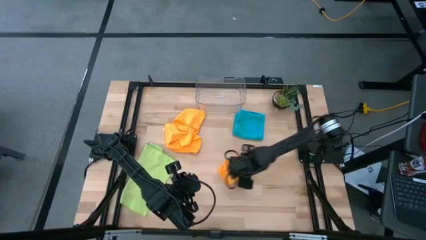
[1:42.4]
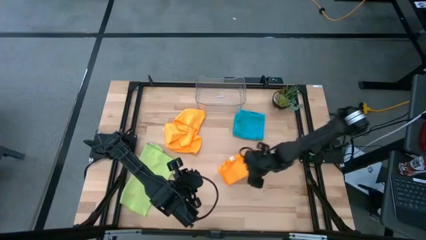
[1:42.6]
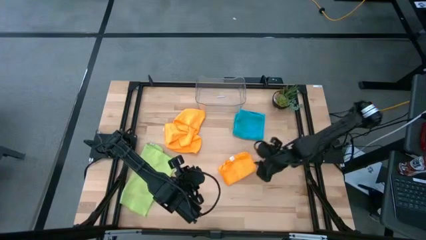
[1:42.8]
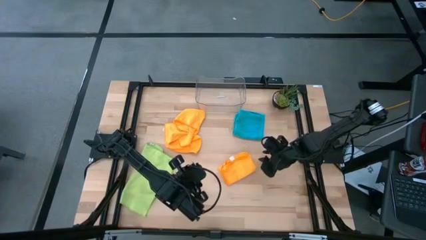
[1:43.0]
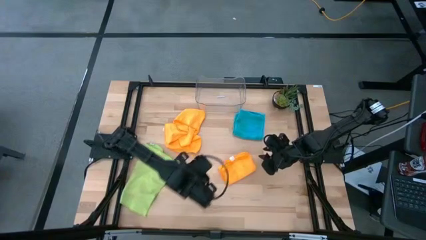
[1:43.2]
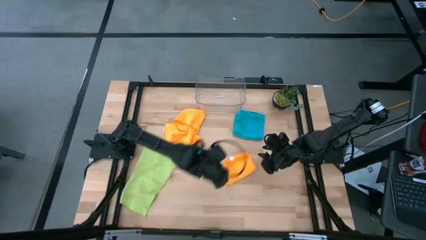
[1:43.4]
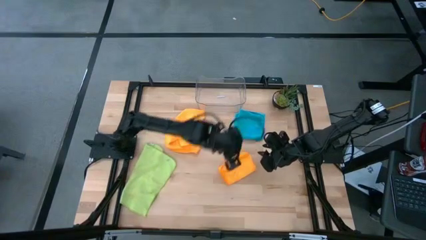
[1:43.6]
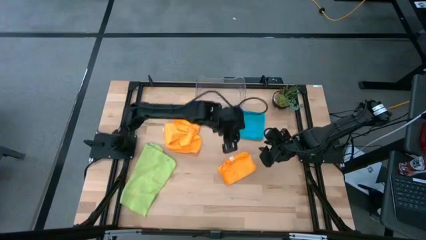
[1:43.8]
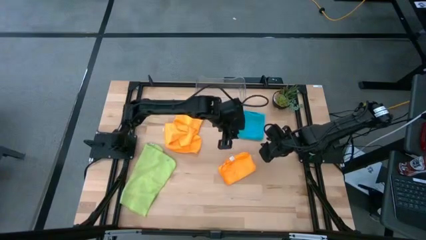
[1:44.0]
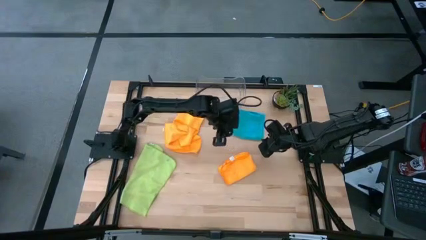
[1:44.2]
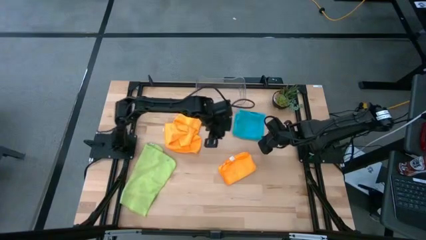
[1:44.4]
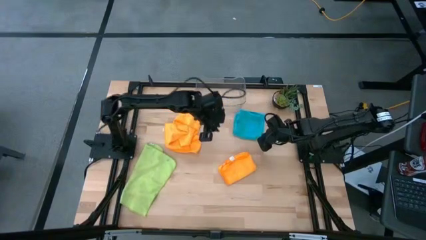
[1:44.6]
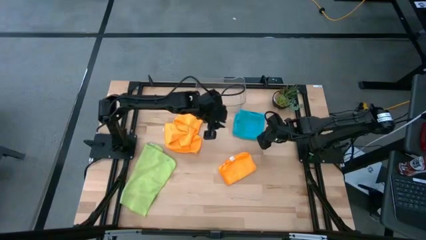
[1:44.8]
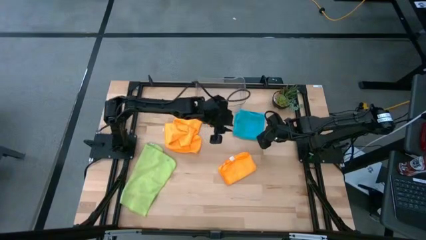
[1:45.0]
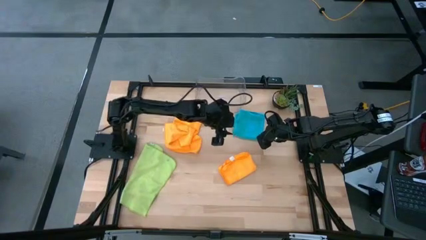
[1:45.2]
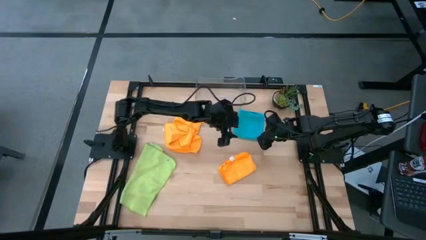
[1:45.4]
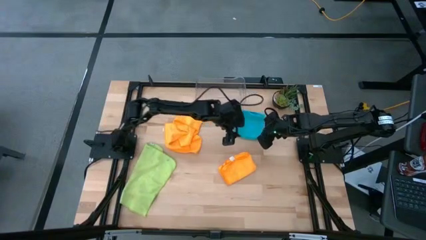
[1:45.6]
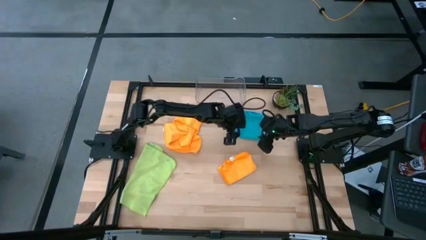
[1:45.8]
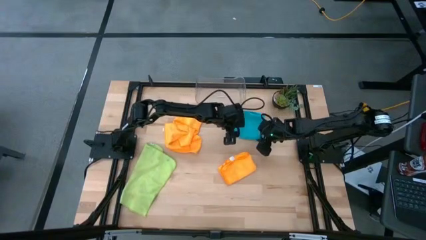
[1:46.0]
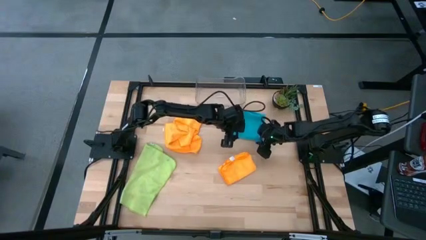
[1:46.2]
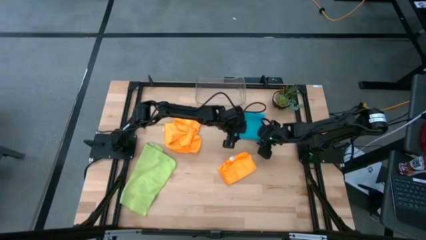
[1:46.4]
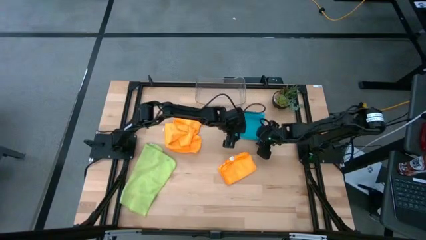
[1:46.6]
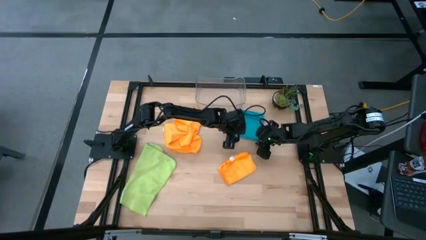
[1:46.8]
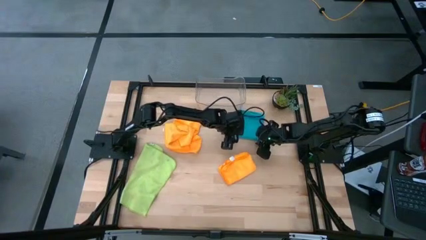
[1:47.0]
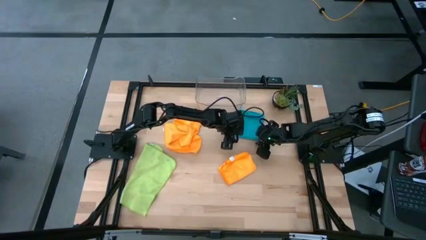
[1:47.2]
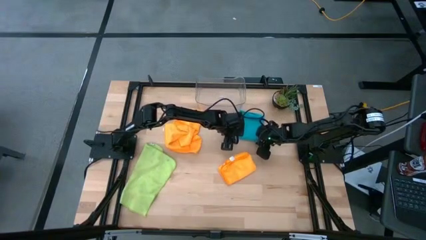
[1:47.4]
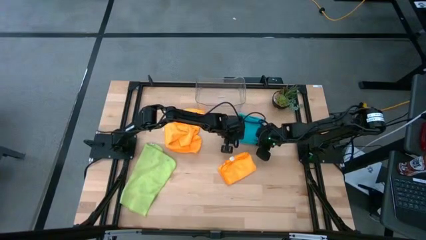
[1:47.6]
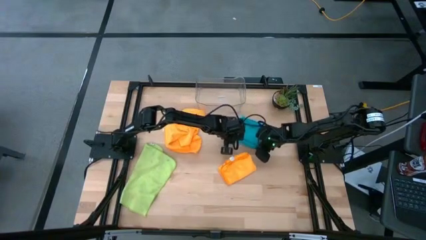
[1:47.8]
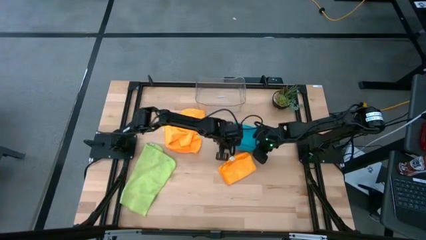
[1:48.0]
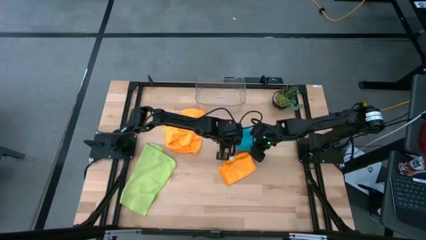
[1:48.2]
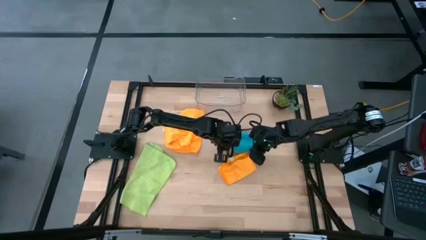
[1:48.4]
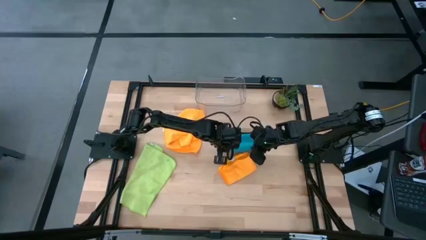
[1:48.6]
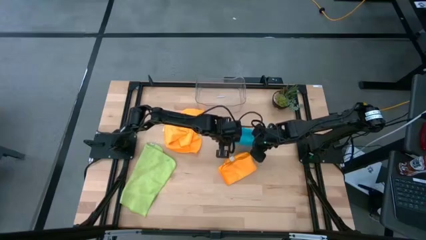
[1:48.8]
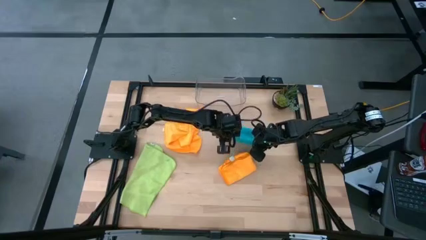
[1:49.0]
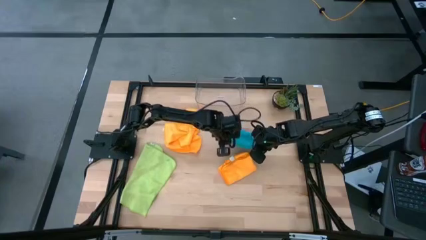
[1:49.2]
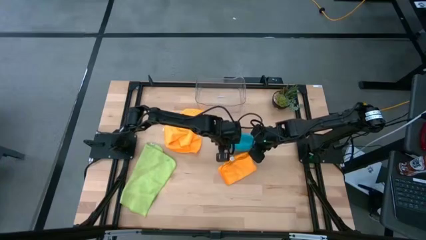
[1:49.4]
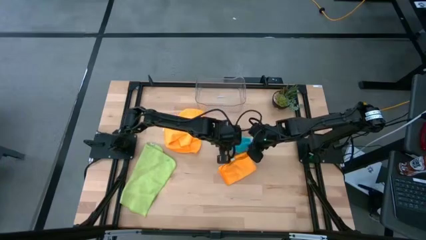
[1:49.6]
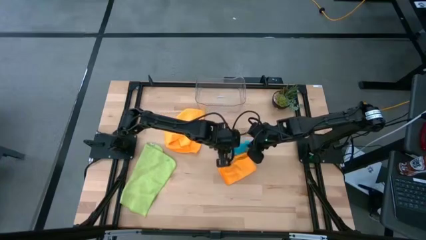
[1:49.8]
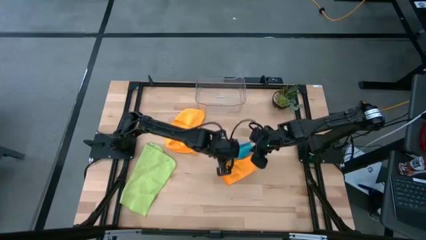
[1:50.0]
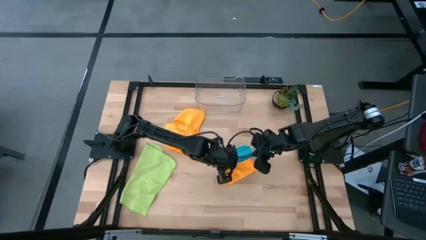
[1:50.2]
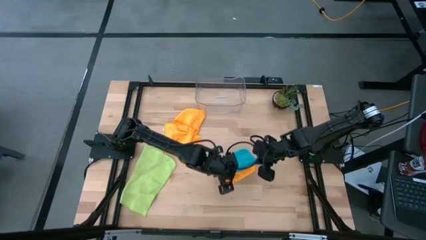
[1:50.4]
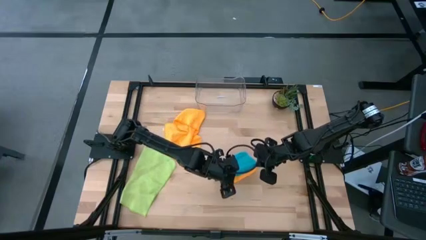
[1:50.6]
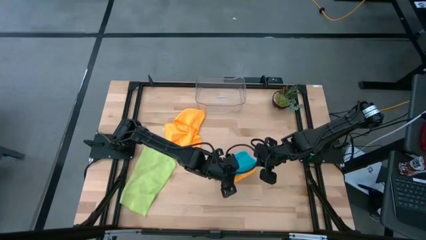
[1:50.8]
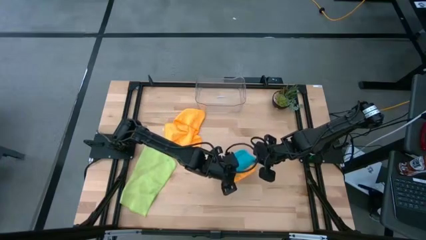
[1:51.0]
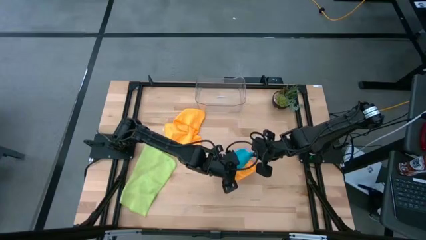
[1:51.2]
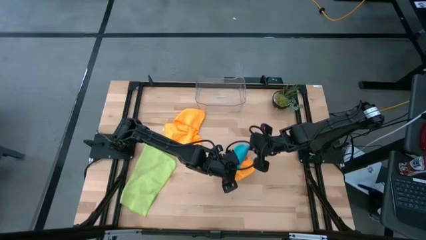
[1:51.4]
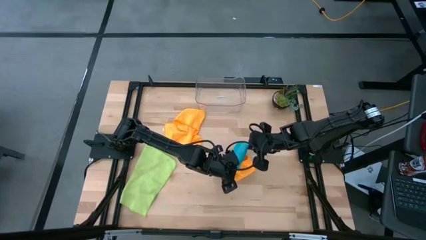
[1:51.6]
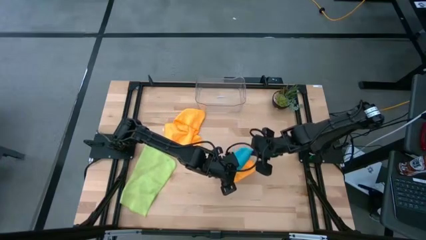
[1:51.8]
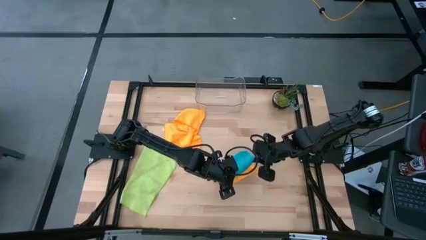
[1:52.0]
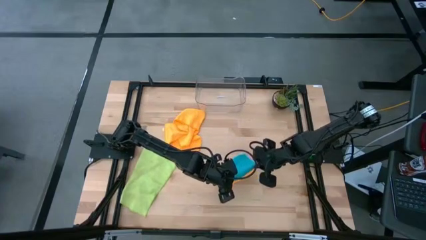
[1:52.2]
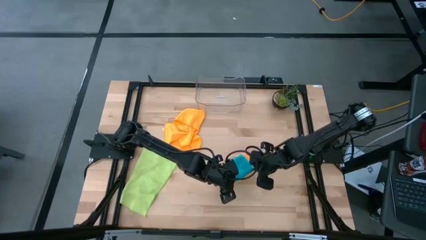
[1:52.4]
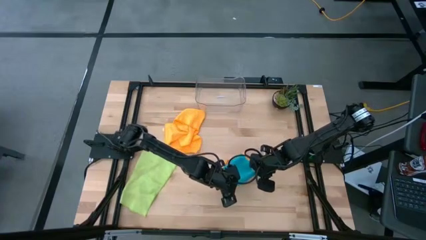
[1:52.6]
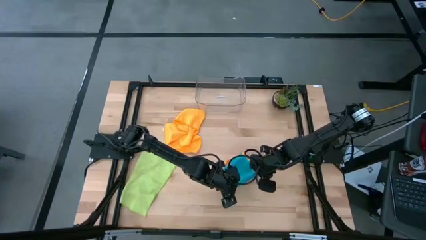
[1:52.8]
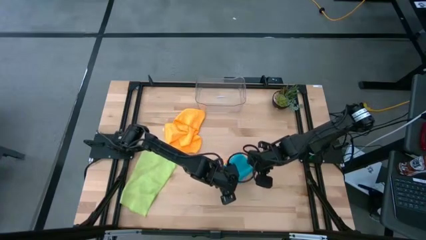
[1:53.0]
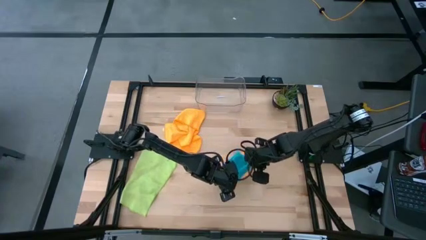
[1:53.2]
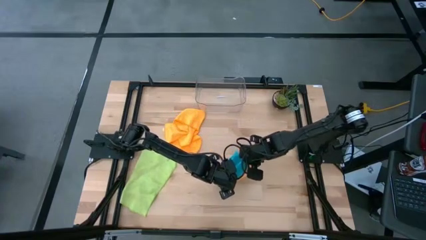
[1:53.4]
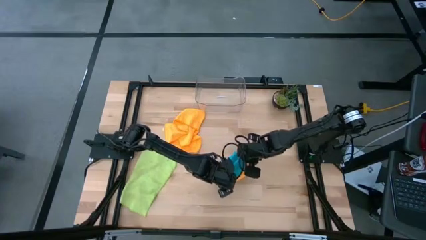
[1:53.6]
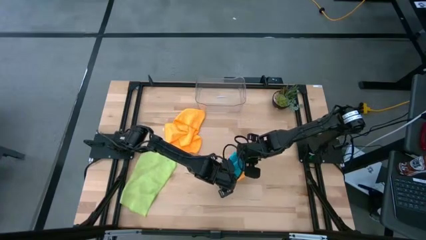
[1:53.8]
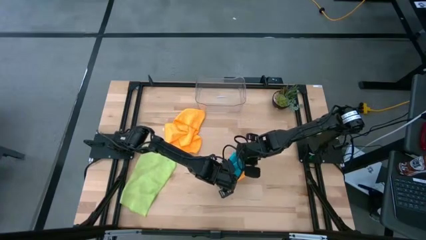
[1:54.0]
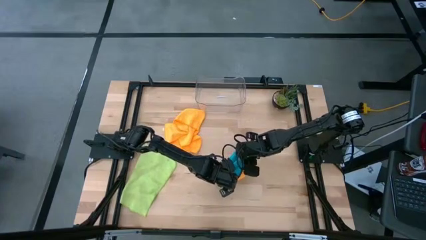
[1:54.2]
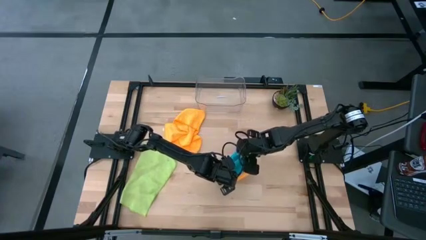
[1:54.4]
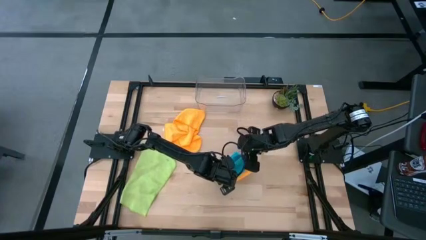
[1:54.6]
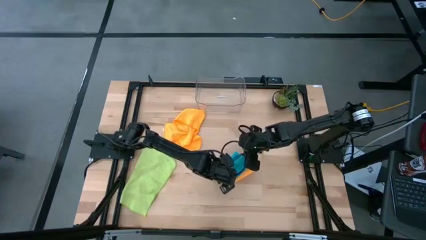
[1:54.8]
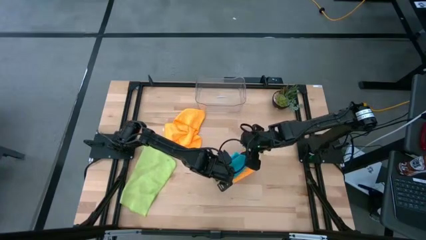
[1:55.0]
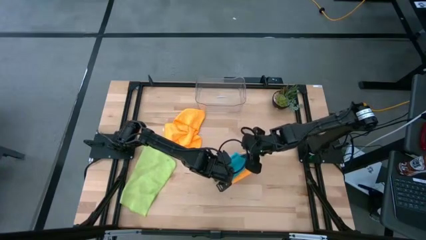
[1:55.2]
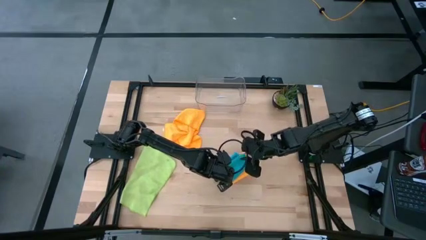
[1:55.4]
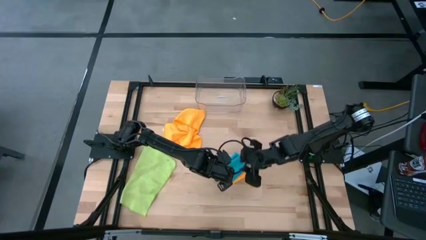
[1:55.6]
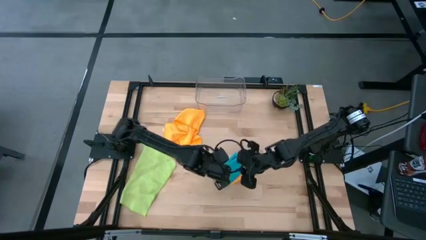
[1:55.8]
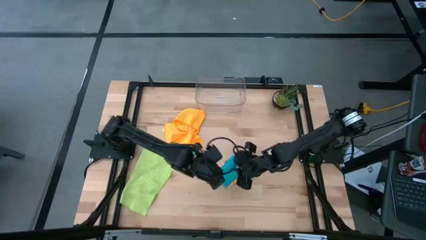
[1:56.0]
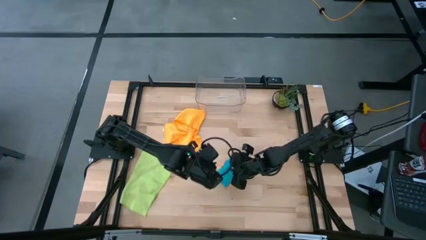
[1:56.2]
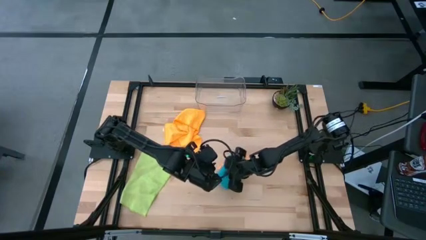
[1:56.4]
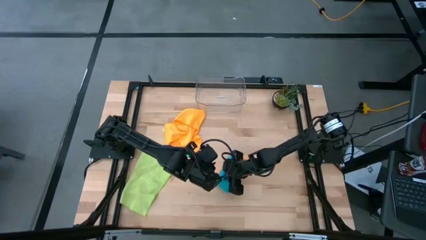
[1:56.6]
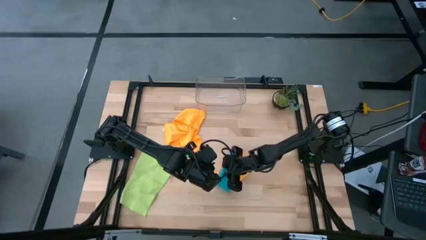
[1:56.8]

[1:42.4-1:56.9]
Task: Fold microfiber towels
Stack the blue microfiber cloth on top of the bottom orange microfiber cloth
